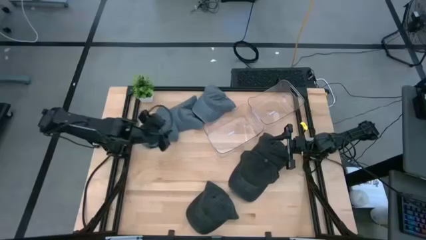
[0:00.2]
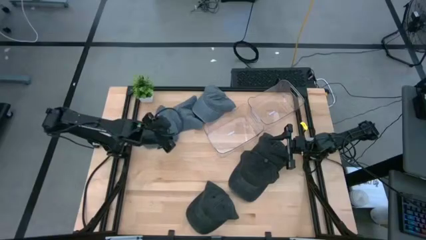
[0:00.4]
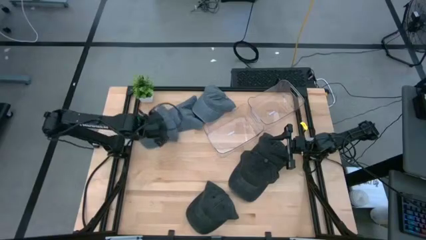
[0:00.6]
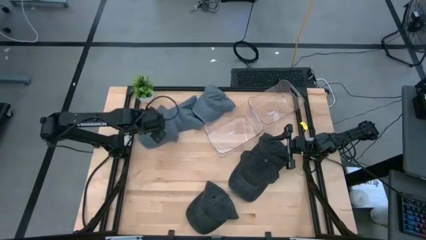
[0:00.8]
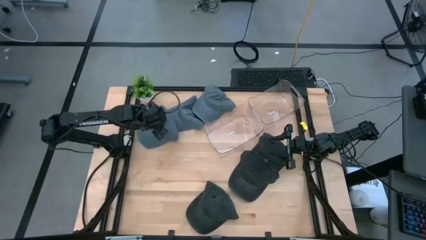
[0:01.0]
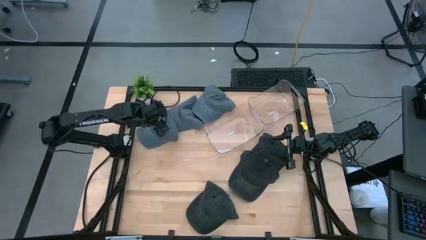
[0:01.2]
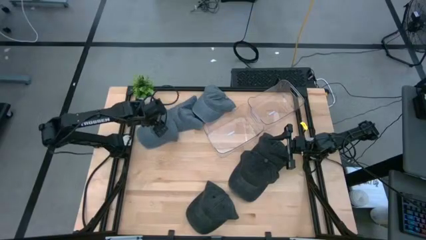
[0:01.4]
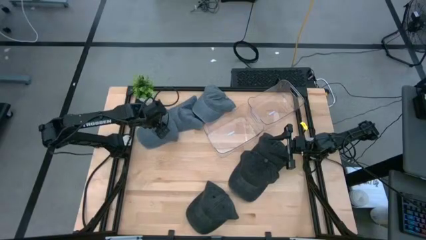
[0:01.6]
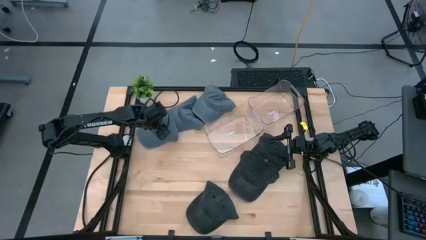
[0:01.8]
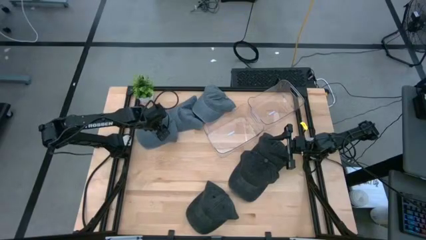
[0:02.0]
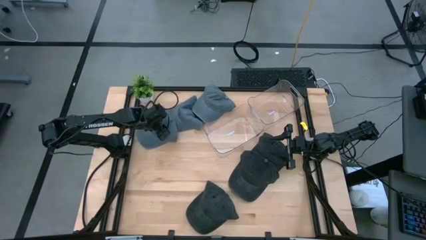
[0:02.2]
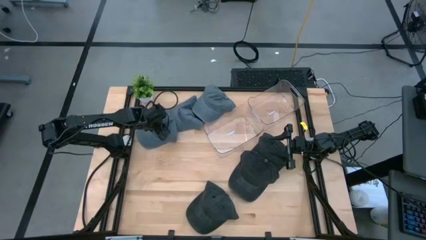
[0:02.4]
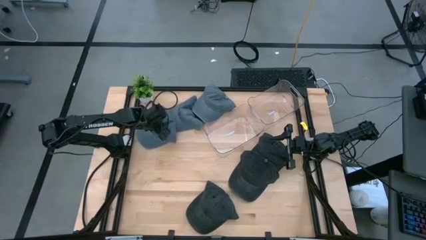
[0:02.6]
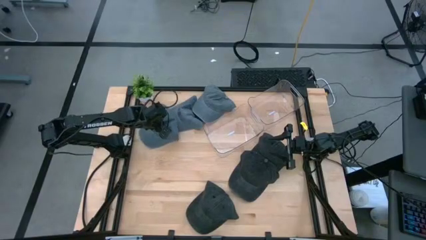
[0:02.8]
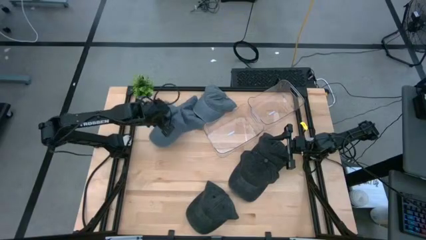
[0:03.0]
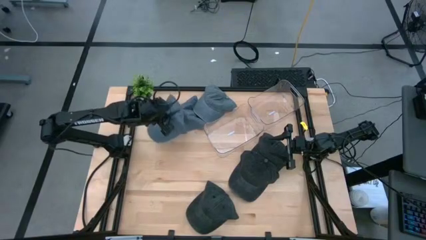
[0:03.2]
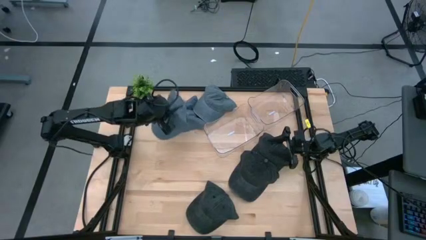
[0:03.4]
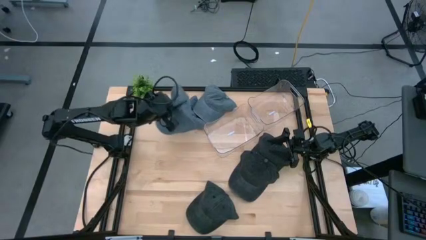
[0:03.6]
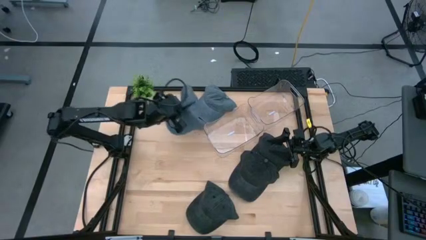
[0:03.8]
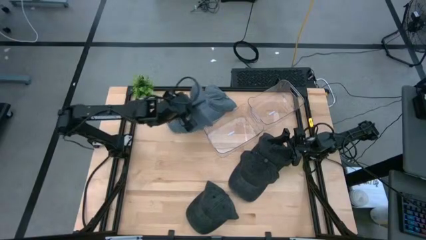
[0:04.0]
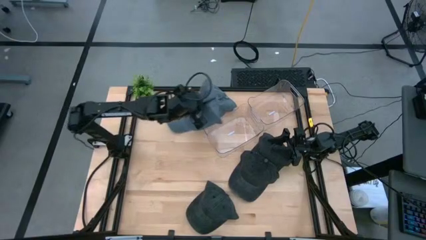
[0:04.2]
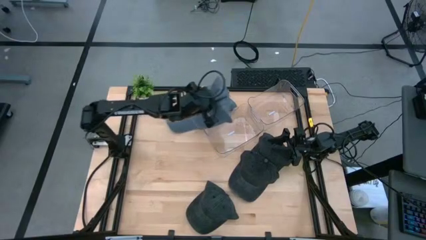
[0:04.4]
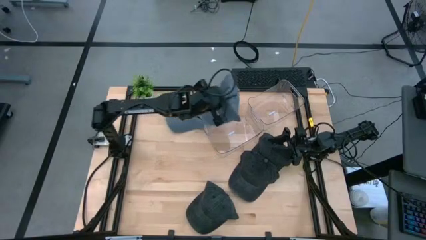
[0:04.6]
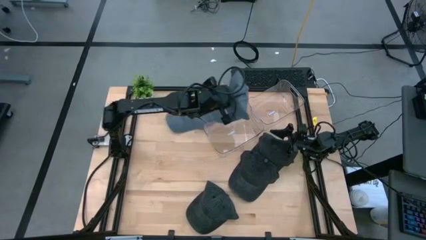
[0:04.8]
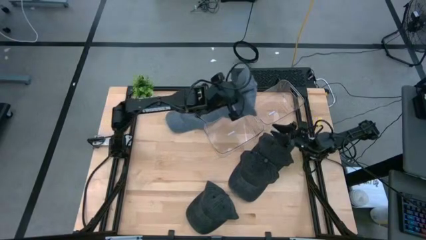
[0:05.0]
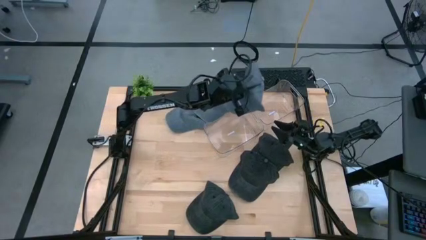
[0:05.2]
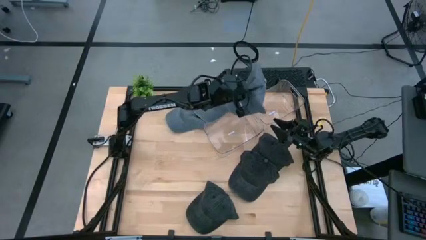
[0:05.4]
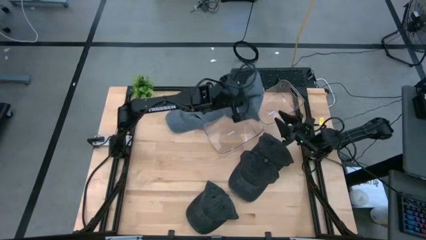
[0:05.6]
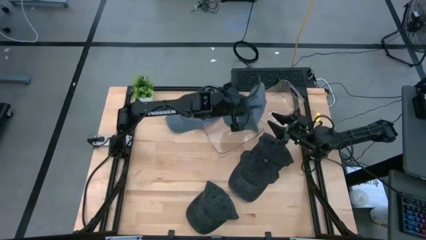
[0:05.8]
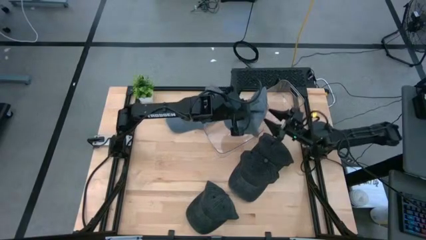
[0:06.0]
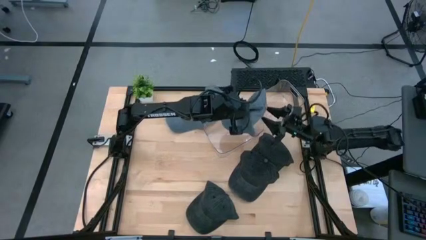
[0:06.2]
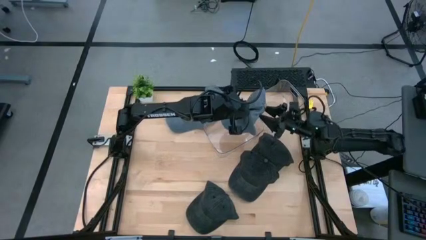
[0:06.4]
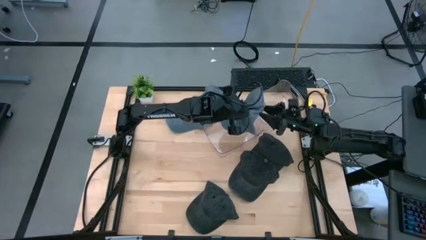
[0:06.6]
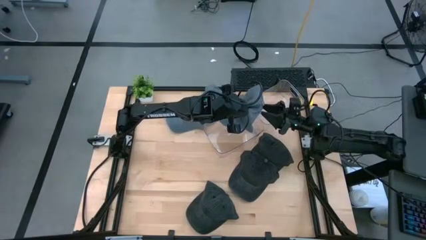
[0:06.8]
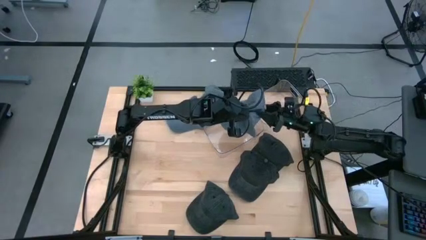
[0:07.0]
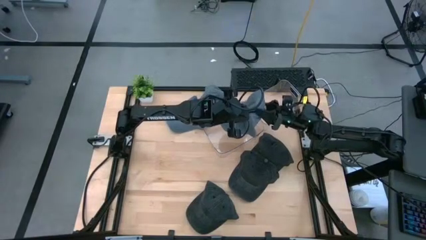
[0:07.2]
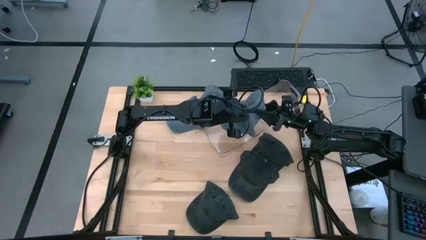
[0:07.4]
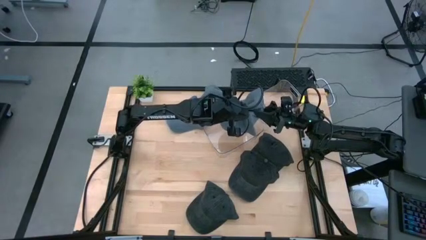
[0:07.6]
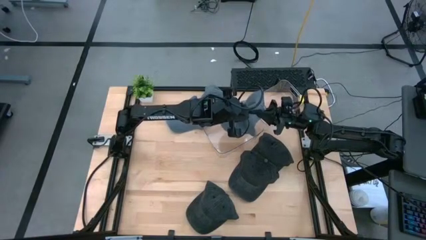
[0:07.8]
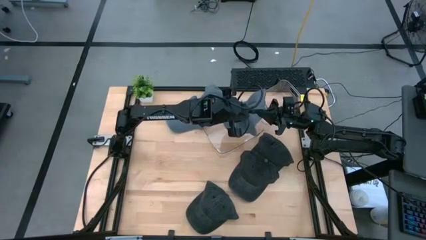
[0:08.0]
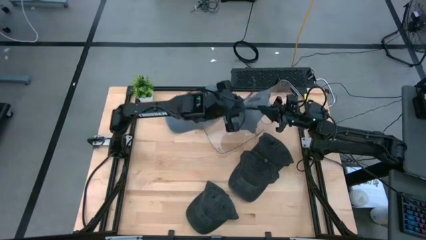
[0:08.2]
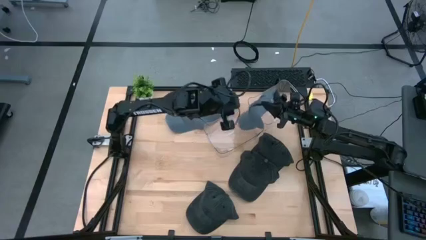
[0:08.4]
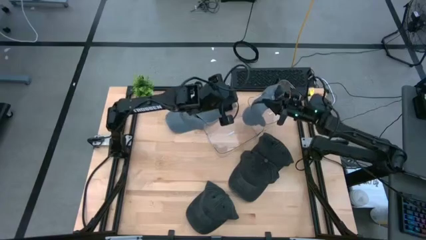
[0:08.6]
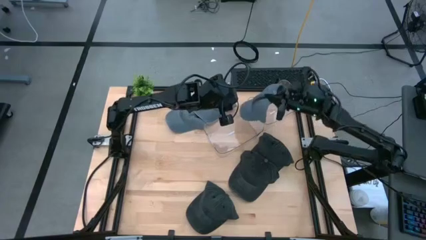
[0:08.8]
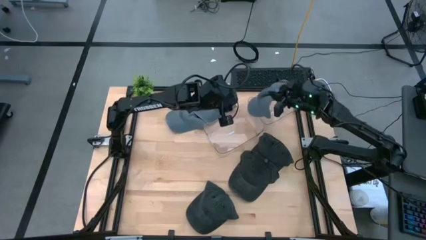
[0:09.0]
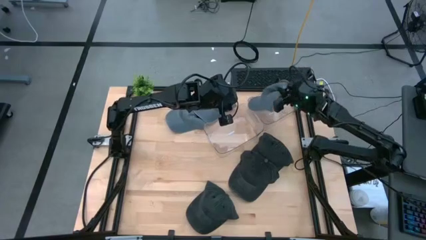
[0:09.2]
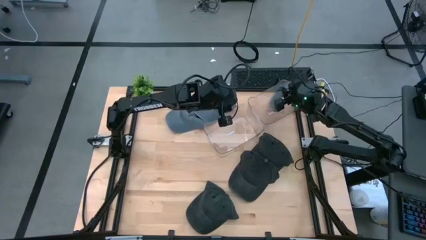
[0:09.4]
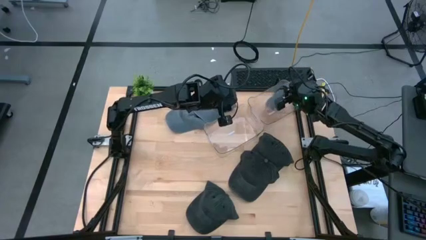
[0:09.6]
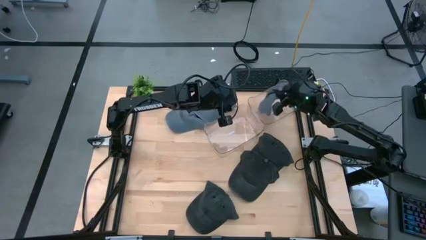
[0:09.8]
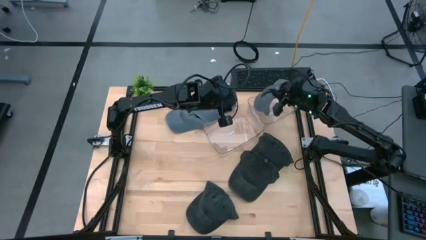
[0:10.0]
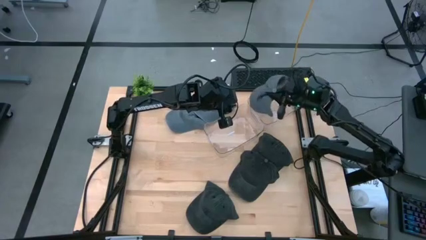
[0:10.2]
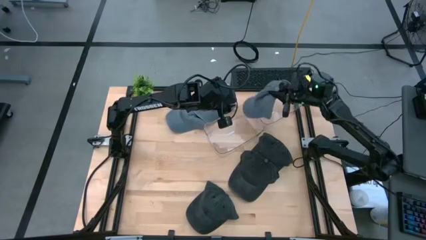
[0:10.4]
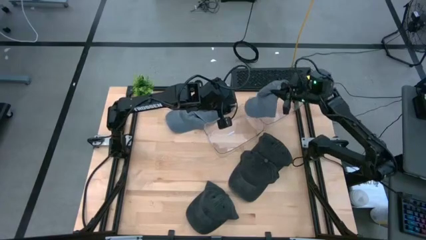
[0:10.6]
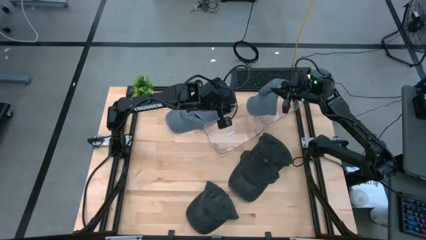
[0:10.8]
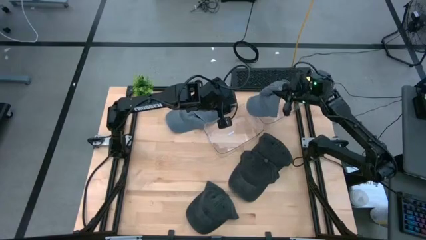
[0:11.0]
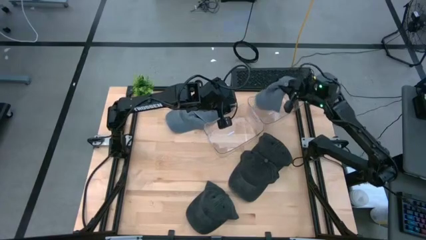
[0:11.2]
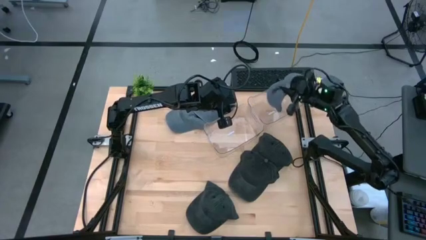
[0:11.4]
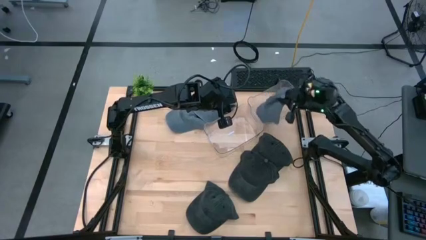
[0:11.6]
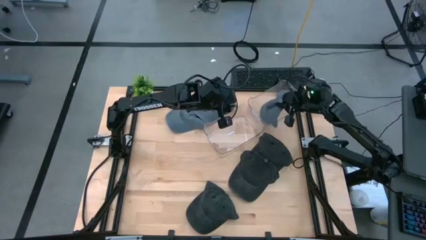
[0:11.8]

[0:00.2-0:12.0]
Task: Pick & Place hat
Put the bottom gray cap into the right transparent bin
